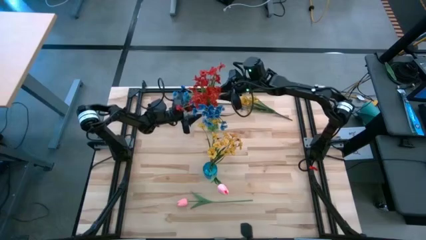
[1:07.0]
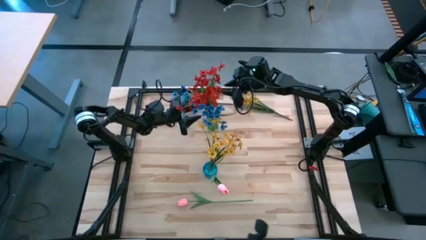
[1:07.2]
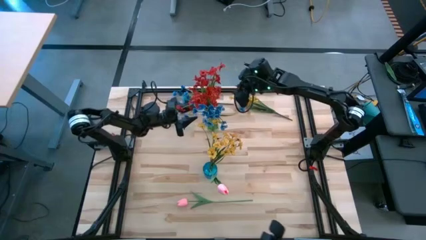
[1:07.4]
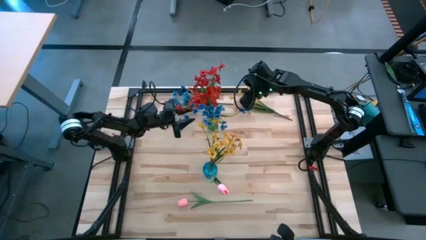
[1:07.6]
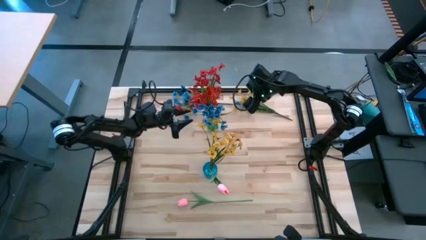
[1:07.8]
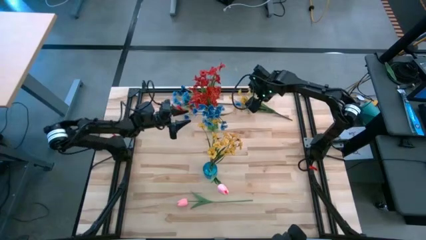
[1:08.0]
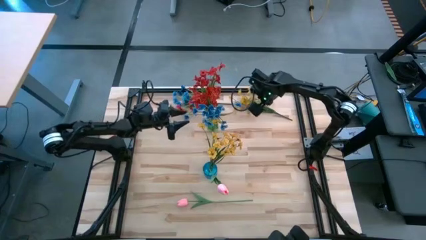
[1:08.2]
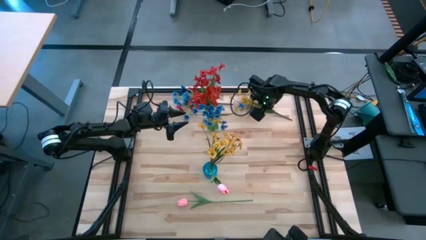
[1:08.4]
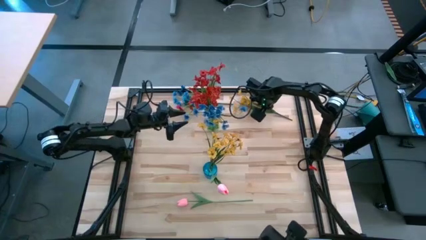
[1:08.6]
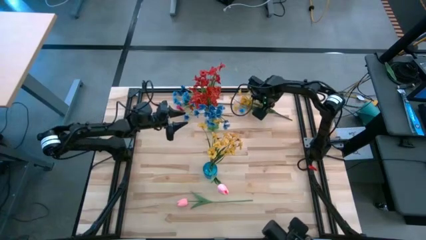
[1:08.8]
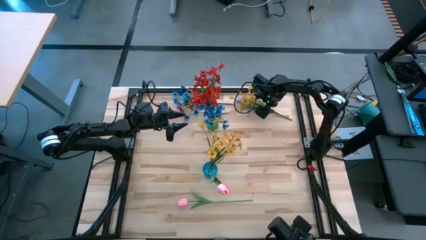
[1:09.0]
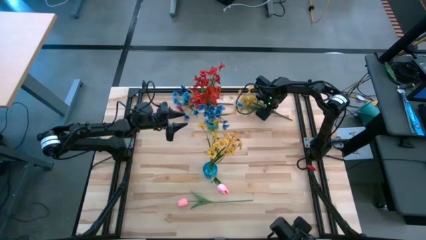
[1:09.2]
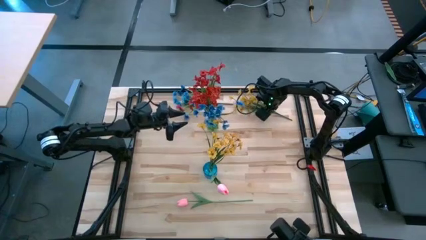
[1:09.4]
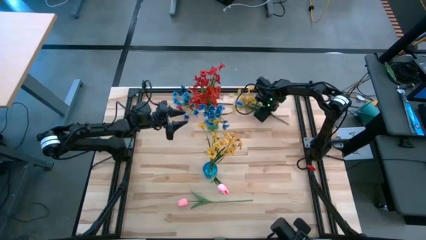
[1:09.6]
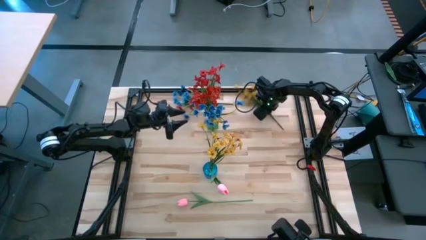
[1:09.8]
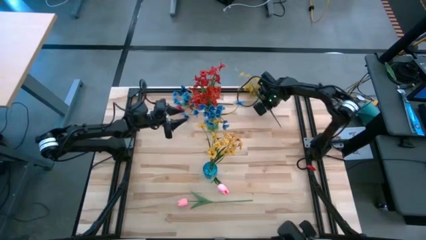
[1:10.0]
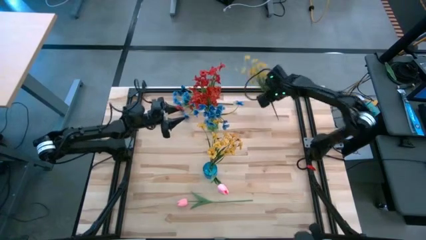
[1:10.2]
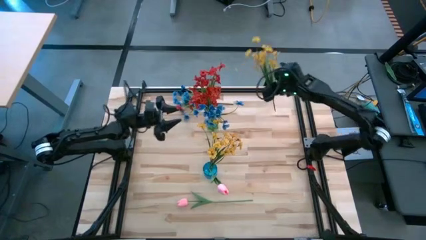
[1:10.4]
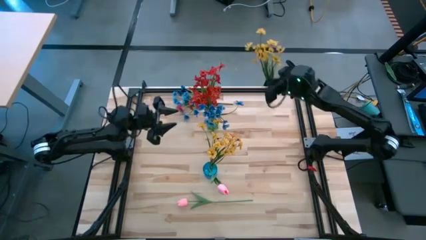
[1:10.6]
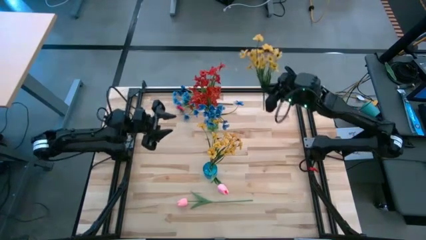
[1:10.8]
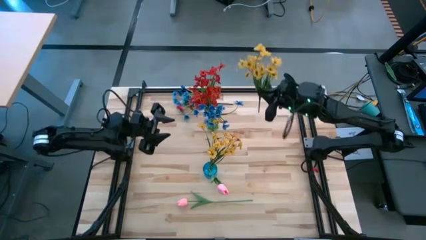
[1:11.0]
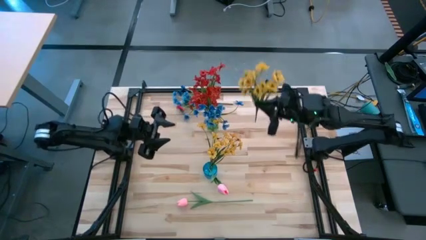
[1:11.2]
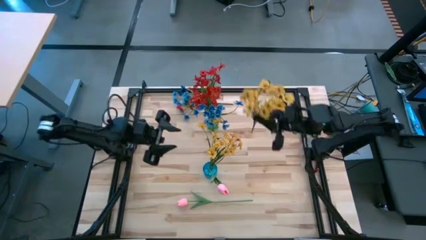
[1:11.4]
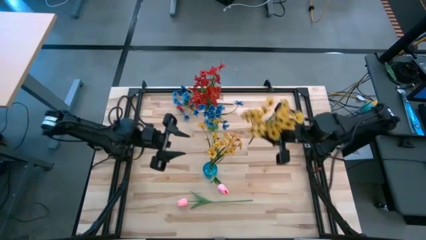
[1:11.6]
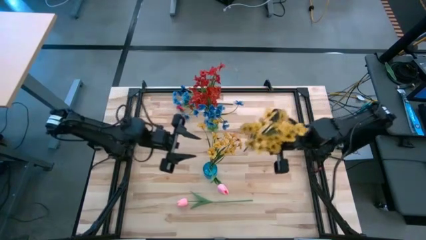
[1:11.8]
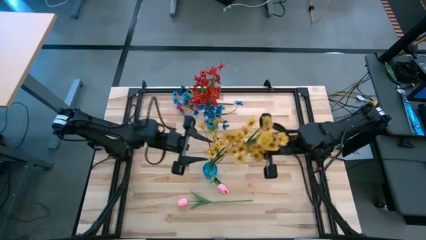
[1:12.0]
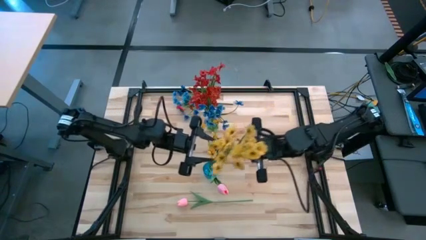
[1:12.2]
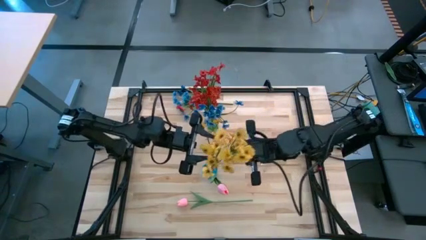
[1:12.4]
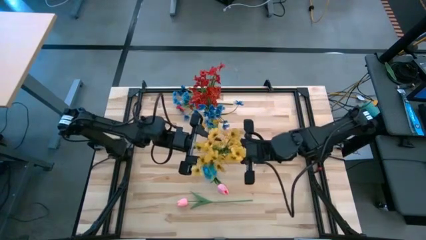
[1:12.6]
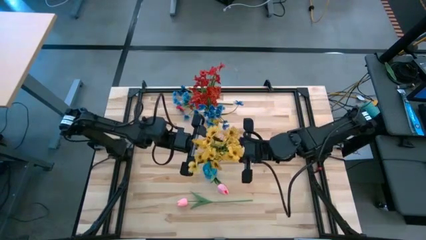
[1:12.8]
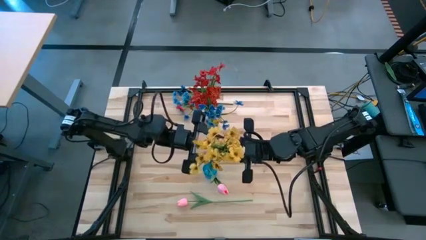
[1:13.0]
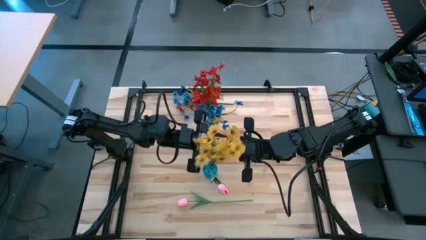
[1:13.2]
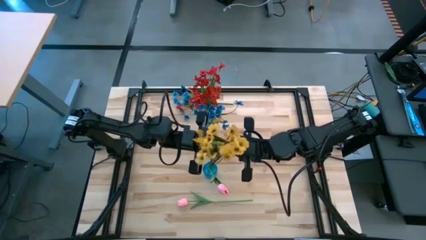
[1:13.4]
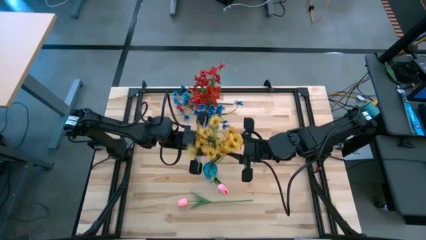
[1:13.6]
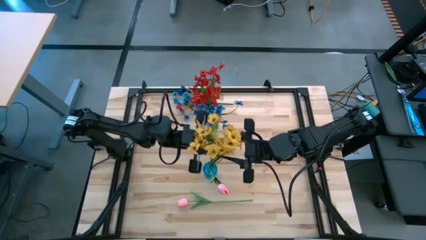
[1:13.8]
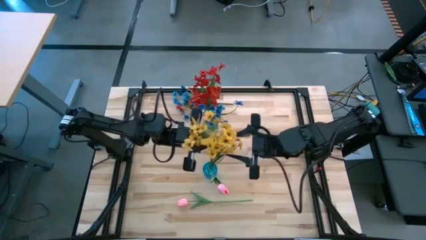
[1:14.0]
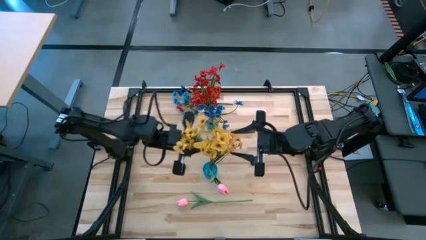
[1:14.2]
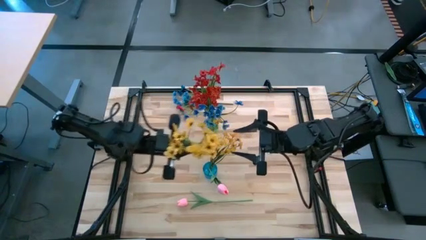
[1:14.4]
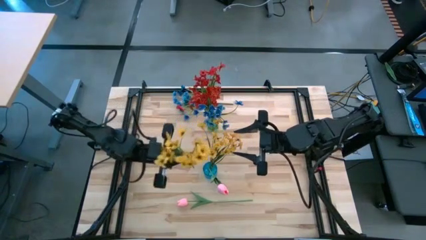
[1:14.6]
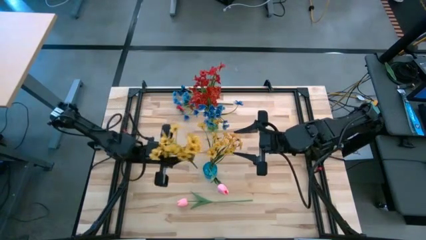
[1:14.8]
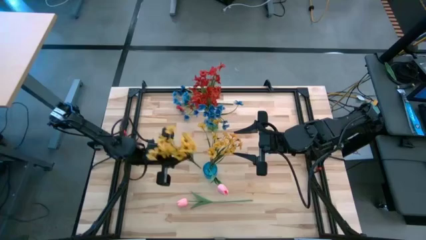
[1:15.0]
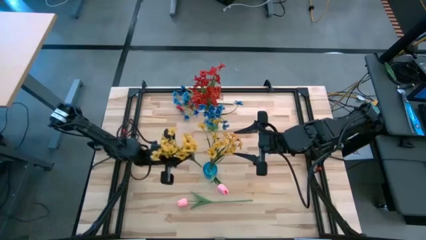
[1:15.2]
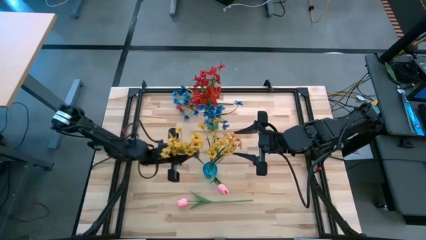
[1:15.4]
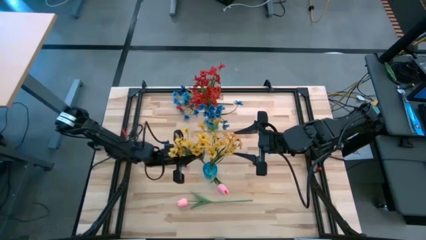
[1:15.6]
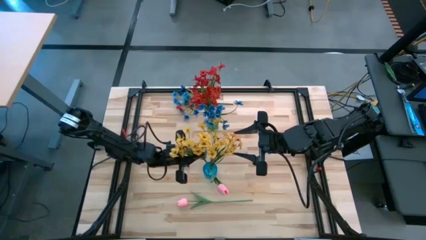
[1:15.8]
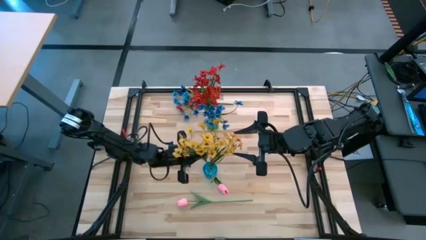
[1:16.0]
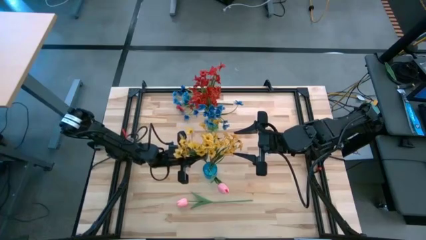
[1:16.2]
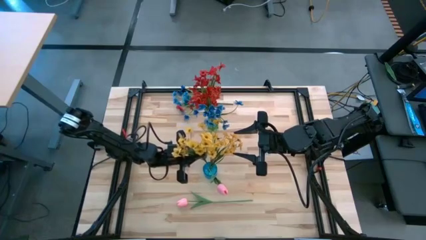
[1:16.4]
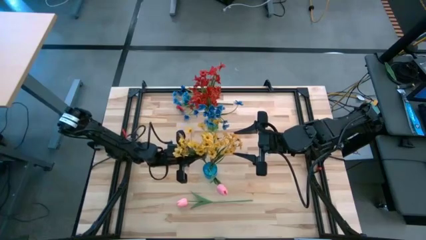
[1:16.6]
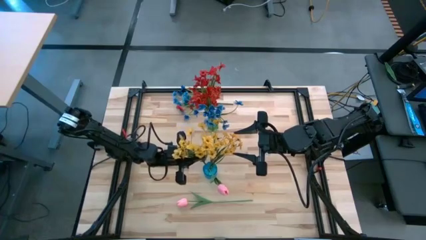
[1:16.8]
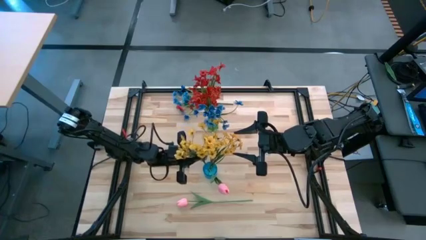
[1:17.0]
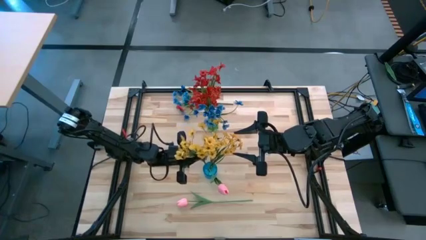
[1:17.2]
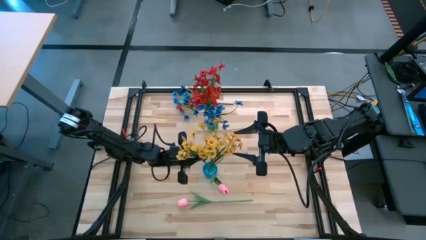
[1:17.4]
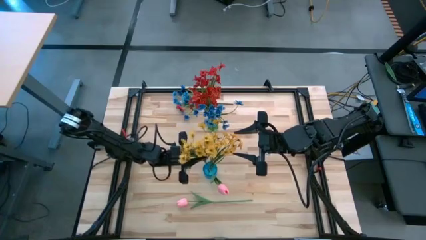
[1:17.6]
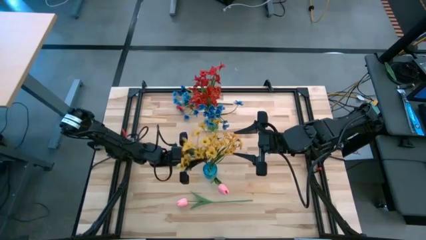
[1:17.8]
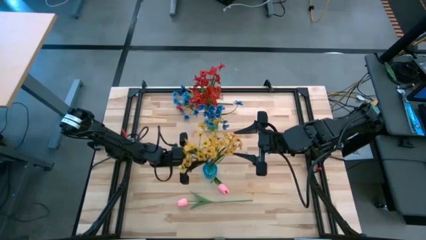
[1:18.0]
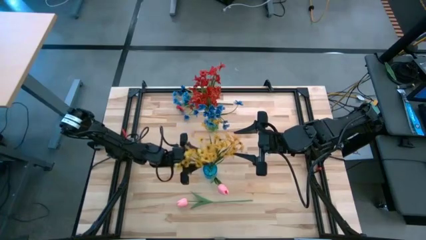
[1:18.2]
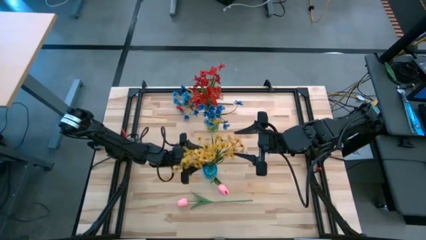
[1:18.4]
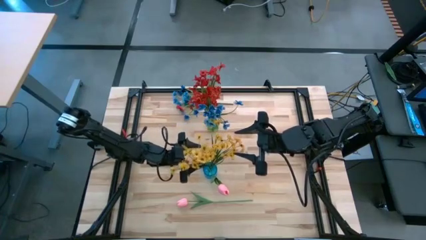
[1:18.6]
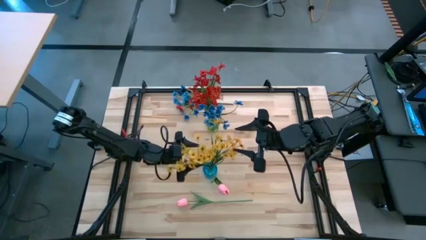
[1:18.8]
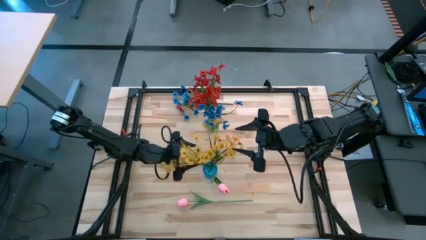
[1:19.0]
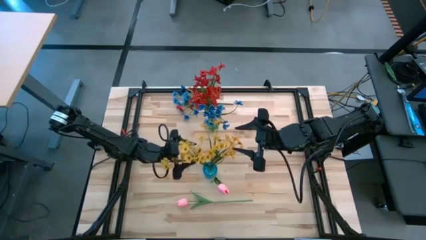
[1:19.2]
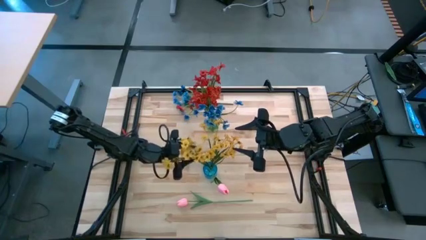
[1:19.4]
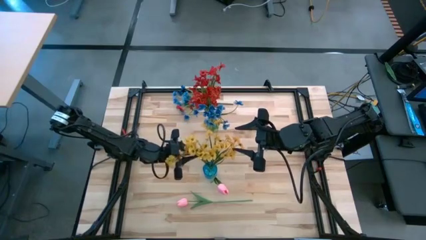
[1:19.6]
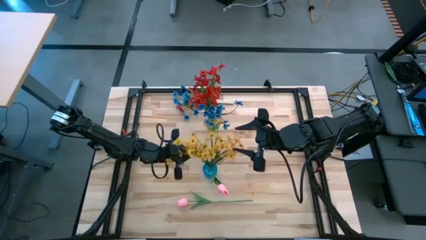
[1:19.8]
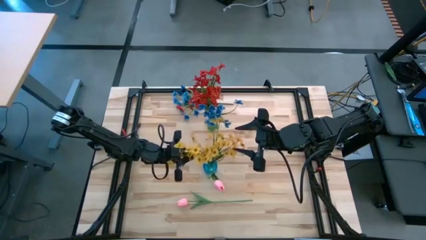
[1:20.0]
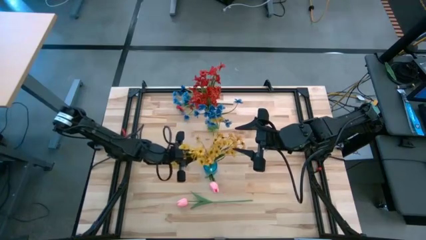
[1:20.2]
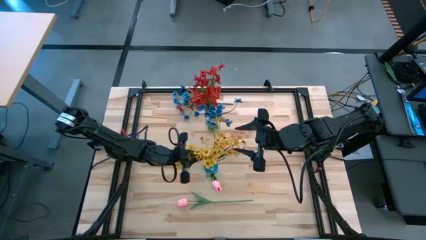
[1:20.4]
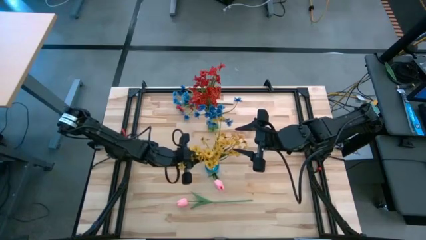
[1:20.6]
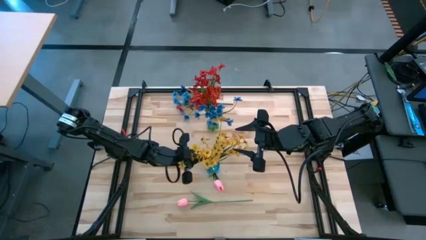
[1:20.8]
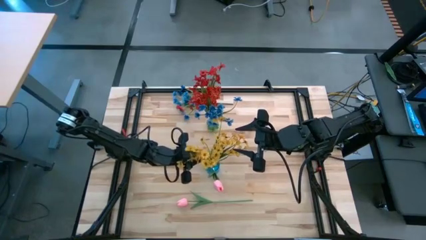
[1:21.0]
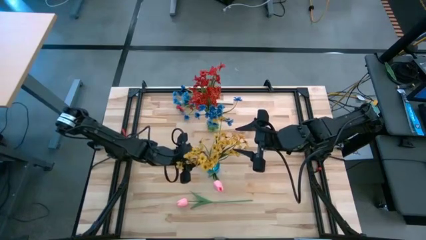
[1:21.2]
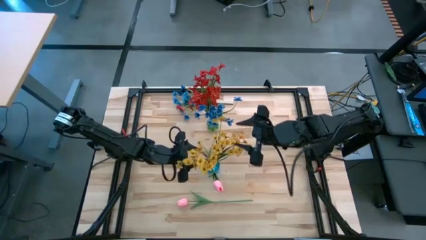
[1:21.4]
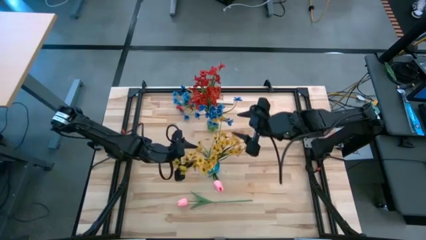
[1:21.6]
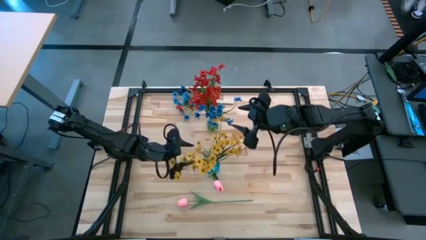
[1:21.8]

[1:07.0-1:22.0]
Task: Sort flowers into vase by color
Put the yellow flowers into the blue vase
